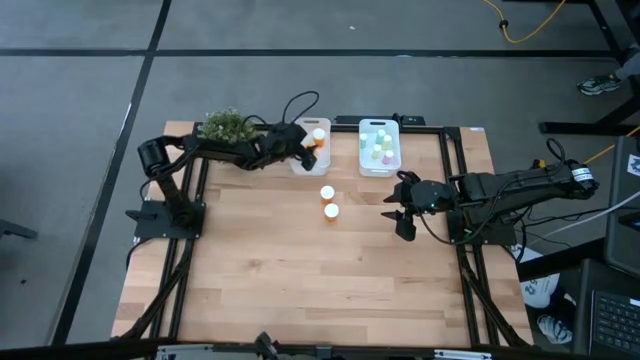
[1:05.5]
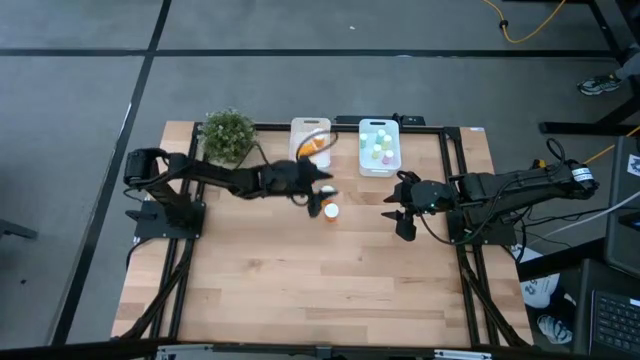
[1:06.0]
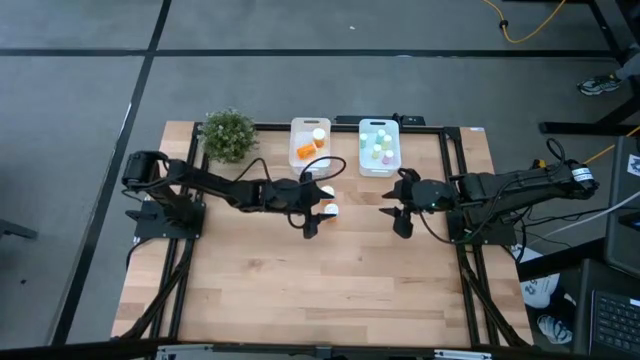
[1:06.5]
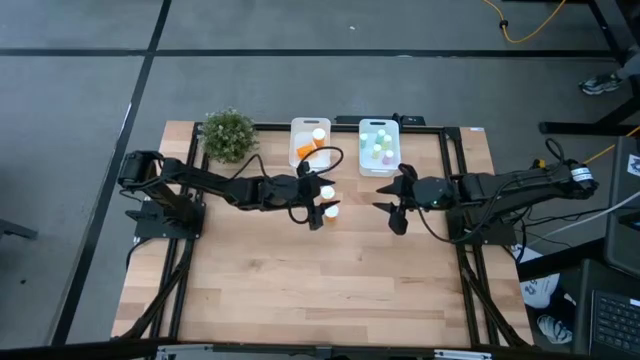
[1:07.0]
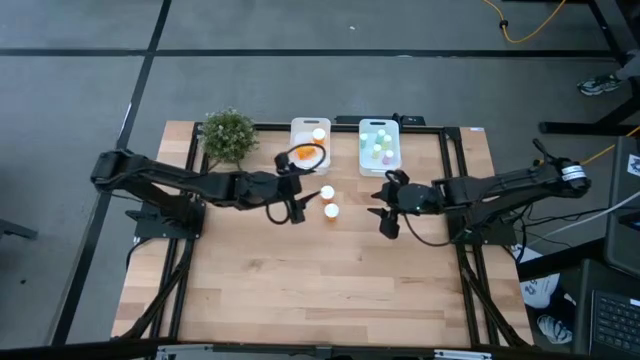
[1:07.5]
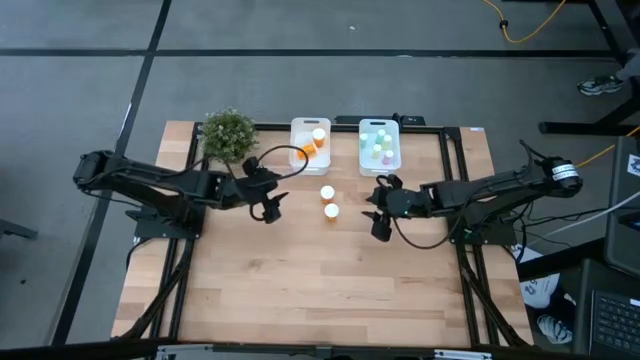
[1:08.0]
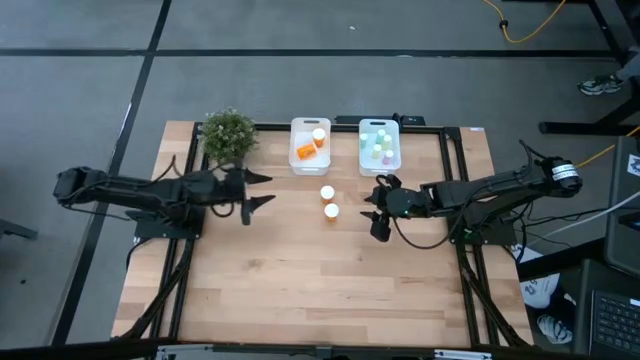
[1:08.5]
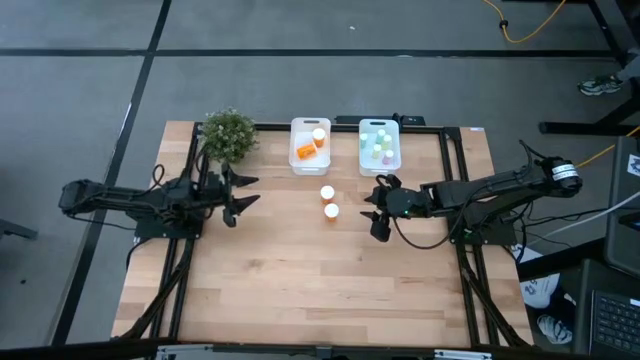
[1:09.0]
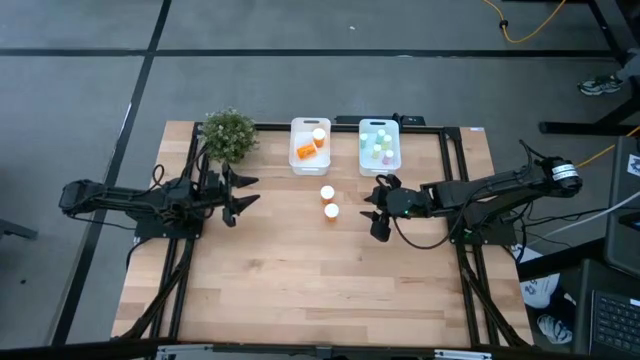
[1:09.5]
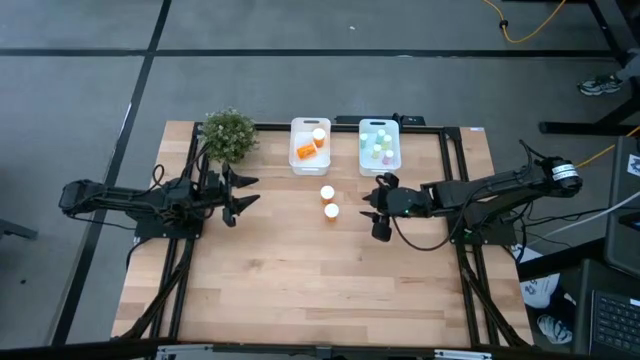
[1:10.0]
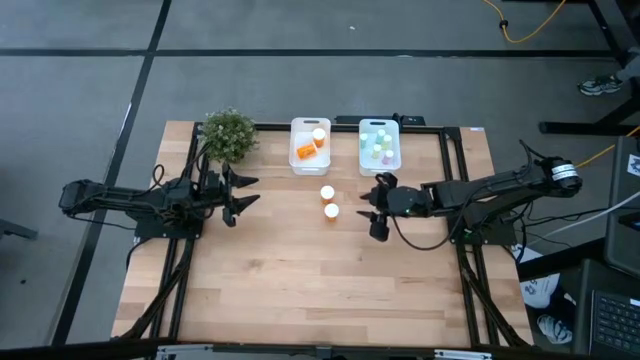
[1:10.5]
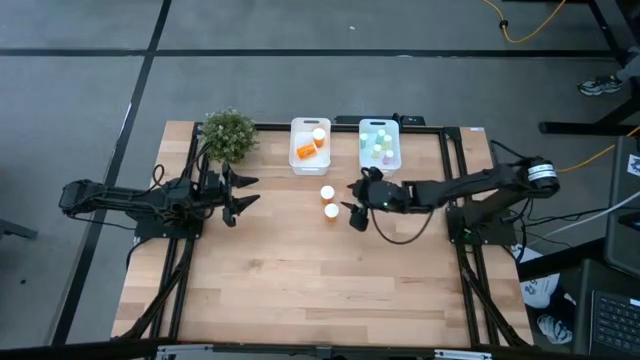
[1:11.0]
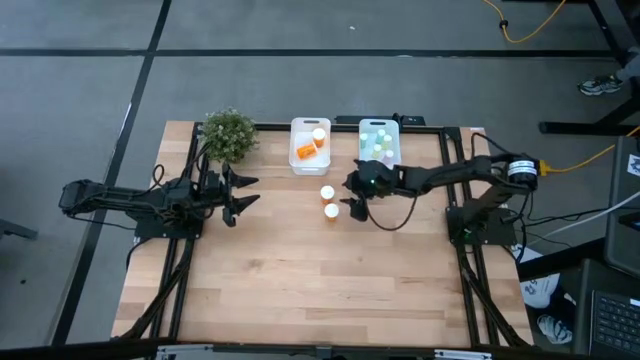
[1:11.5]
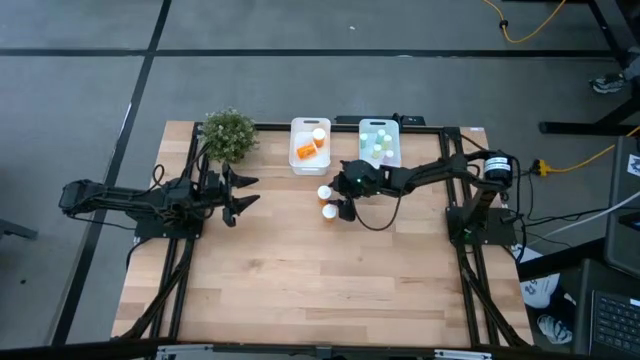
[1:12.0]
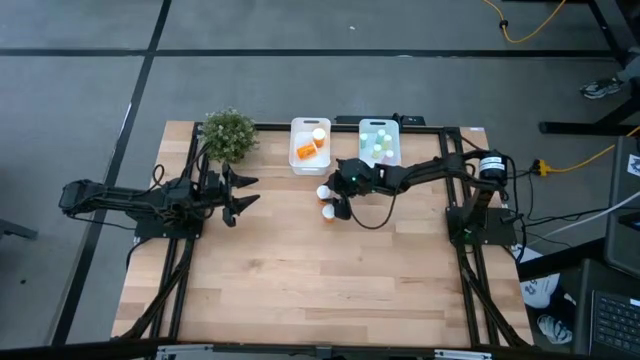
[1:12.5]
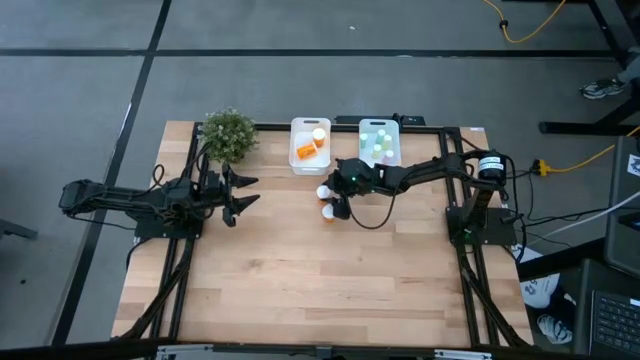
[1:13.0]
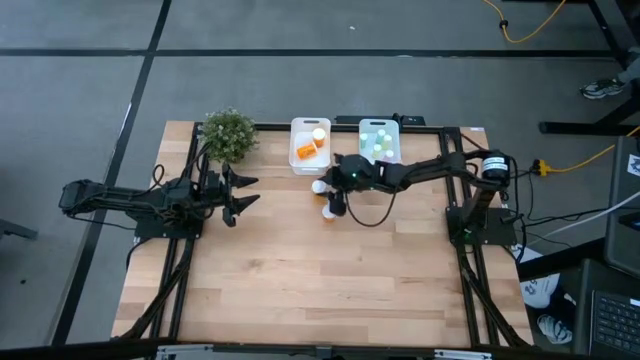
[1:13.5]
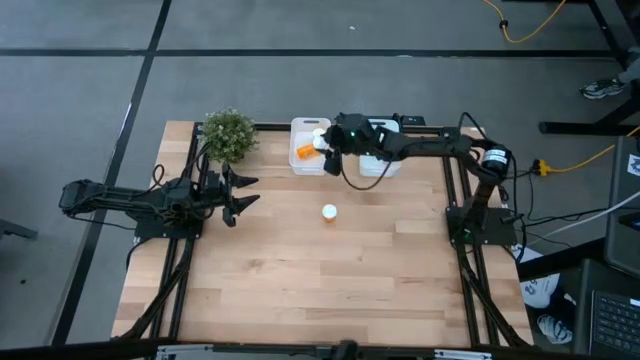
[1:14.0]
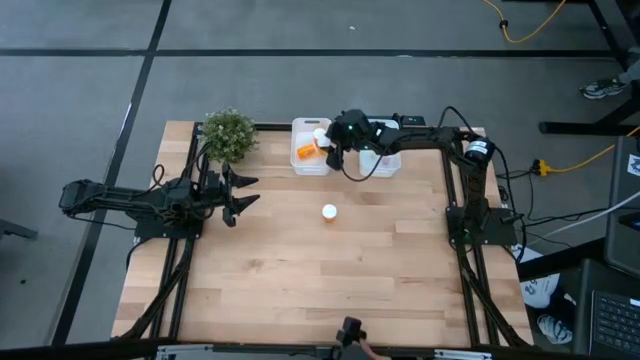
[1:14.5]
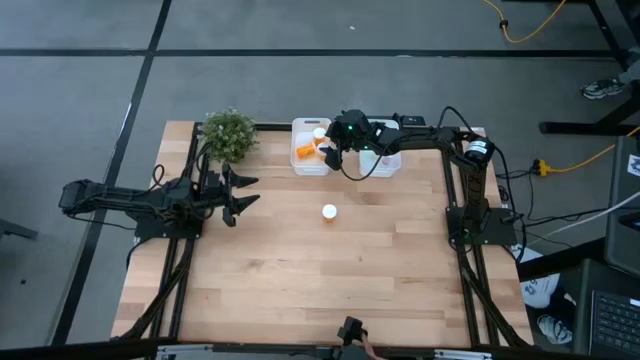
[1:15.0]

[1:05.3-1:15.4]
Task: Pick and place medicine bottles into bin by pill shape (circle, oval)
Put the orange pill bottle into the left white bin

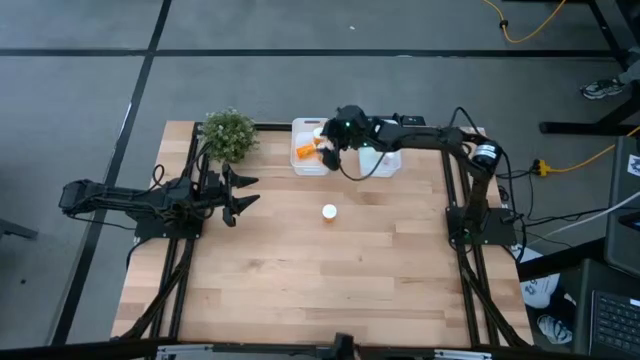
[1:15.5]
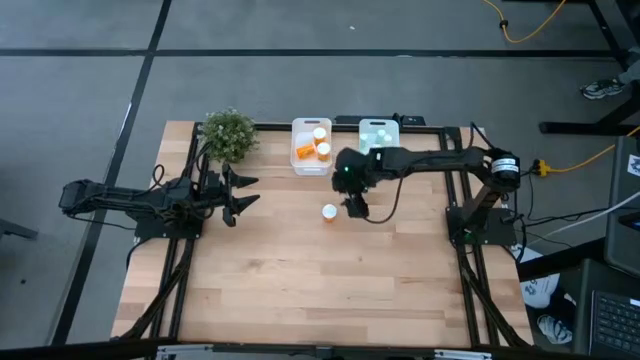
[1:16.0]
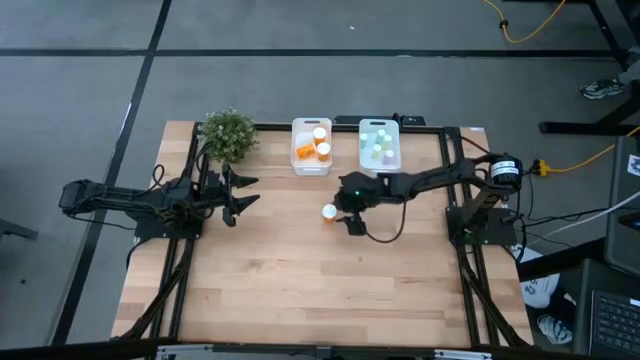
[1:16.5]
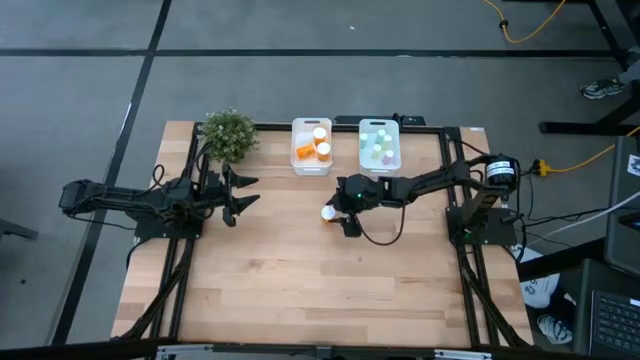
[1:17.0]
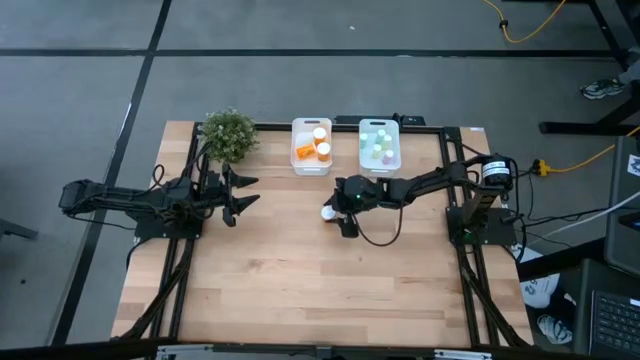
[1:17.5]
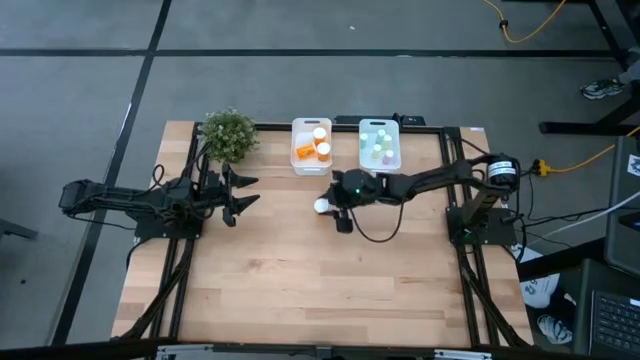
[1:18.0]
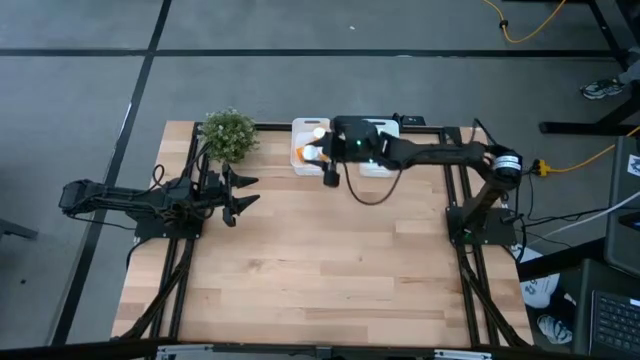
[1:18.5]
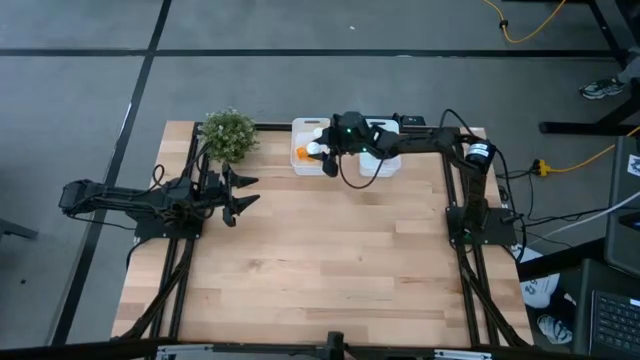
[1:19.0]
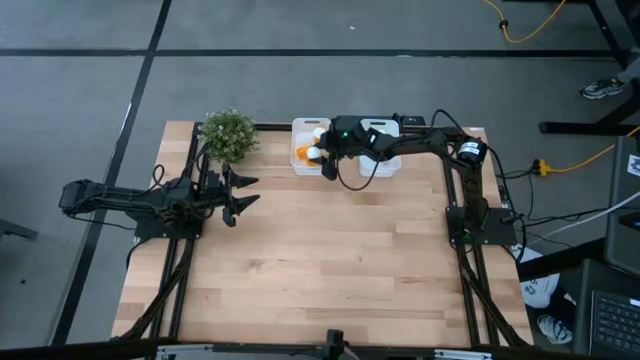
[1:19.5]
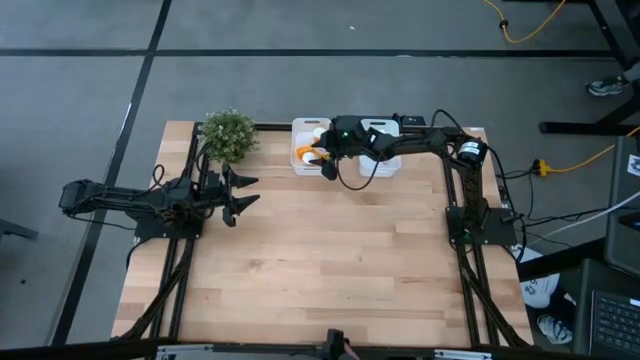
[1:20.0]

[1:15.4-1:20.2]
Put the orange pill bottle into the left white bin

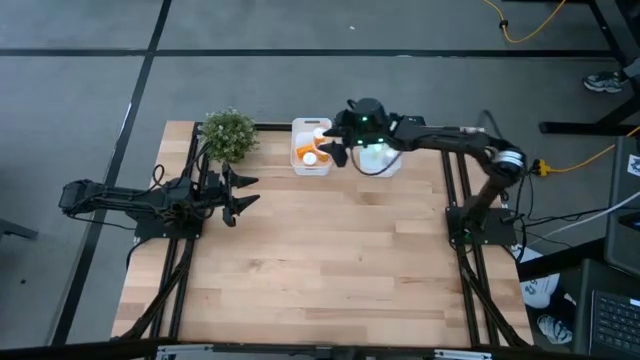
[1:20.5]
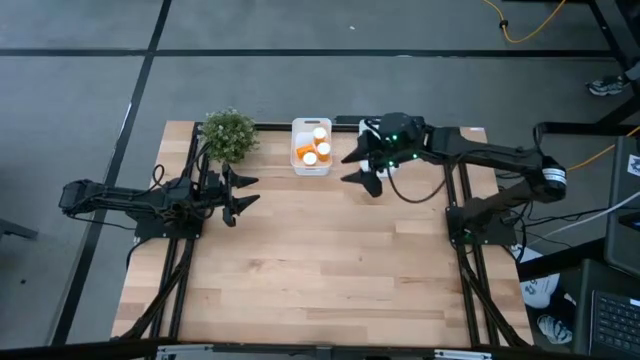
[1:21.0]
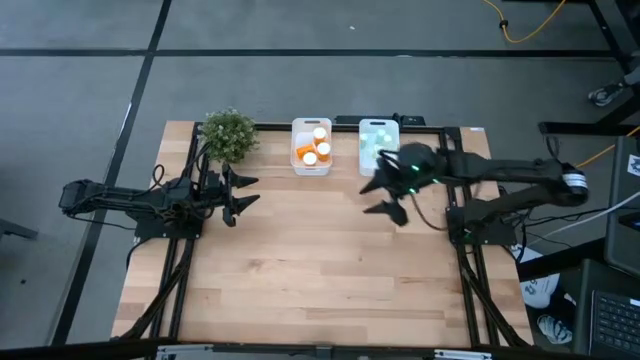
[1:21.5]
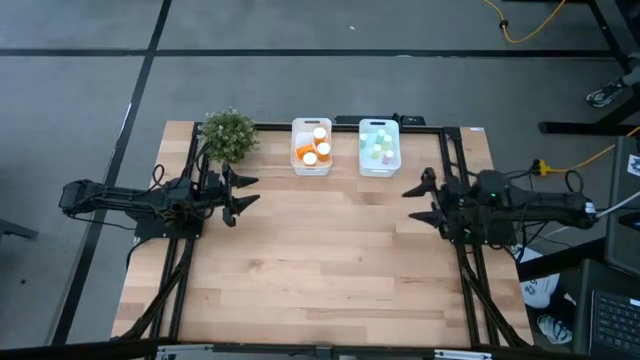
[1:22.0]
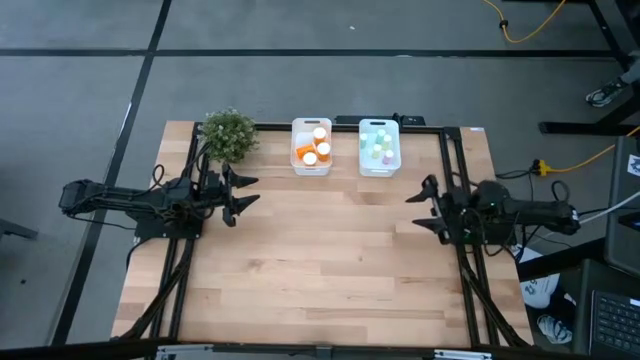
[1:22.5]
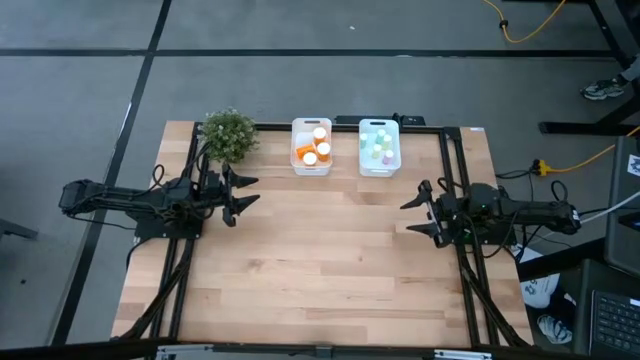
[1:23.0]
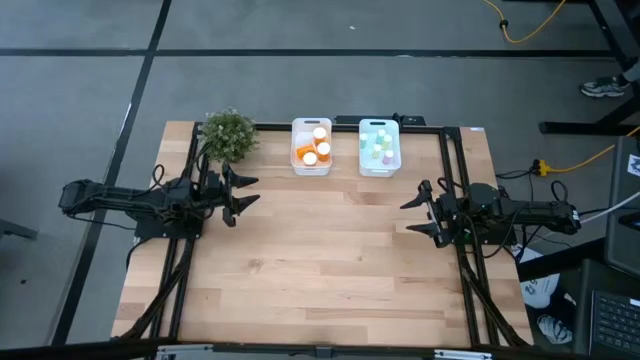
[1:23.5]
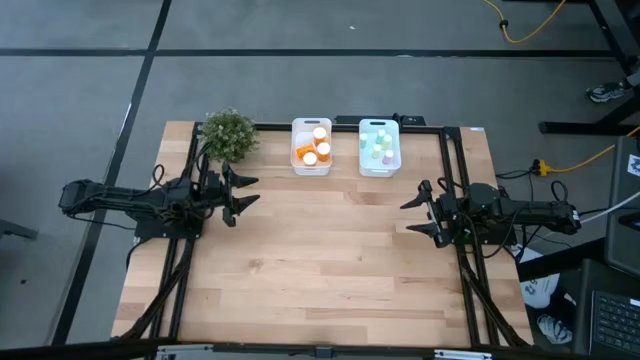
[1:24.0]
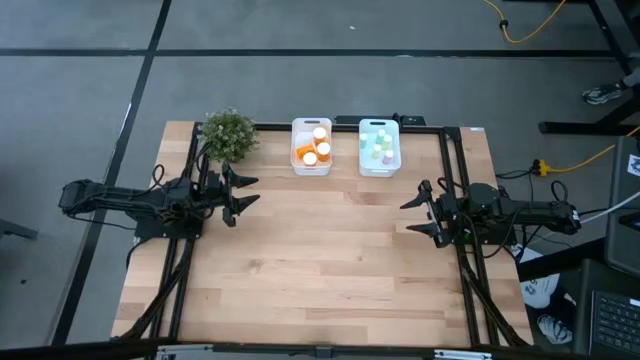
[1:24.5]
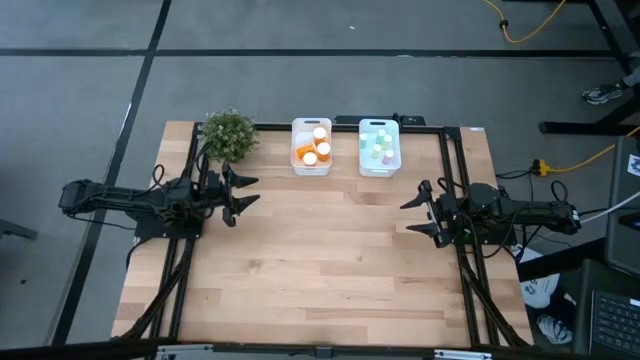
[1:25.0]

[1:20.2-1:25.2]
Return to Home Position

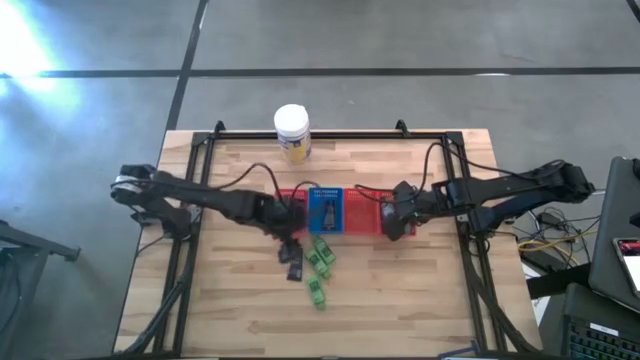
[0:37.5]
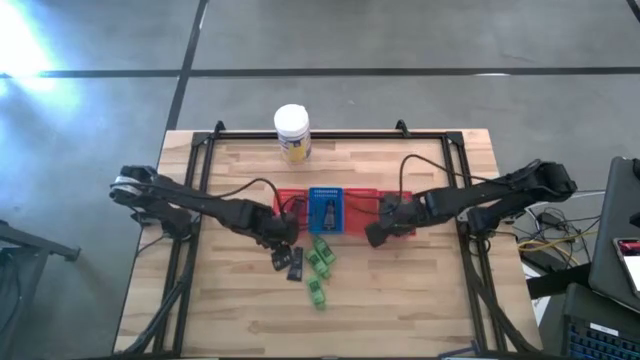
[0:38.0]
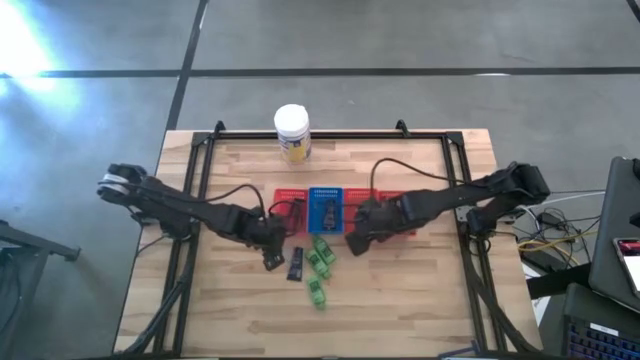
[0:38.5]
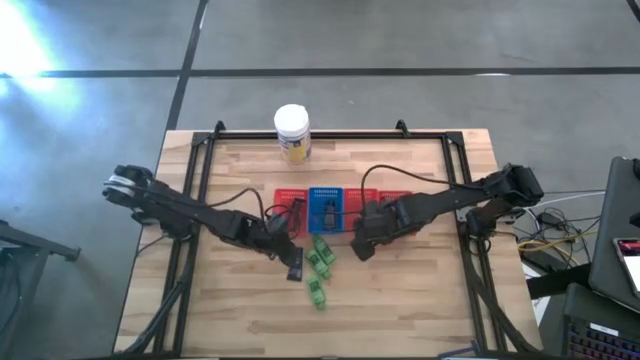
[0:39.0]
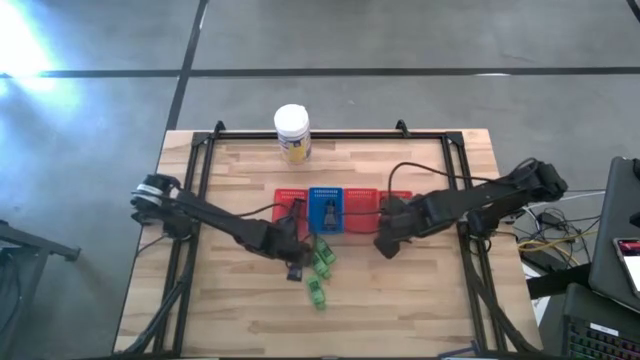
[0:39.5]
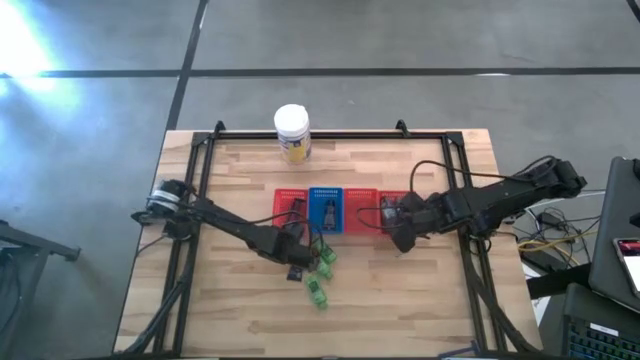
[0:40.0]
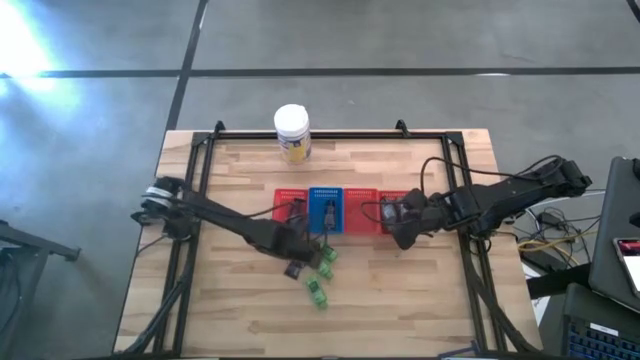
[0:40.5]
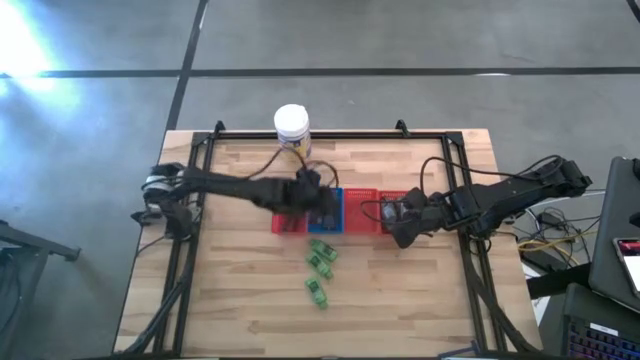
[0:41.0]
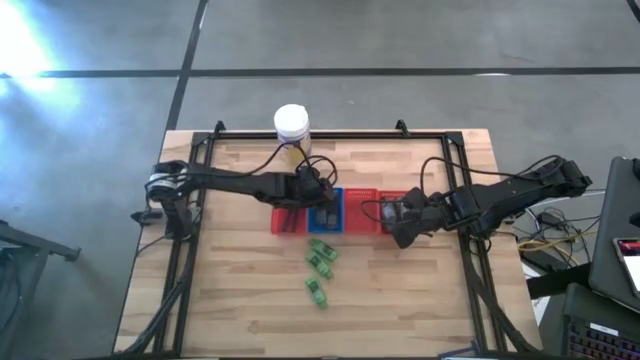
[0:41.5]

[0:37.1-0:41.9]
Task: Pick & Place Travel size toiletries
Put the shave cream into the blue bin
